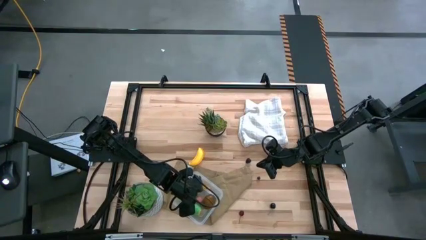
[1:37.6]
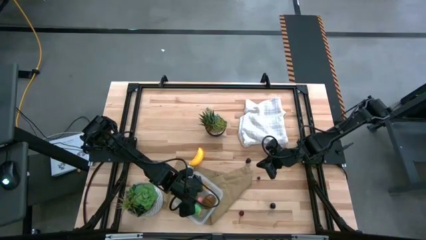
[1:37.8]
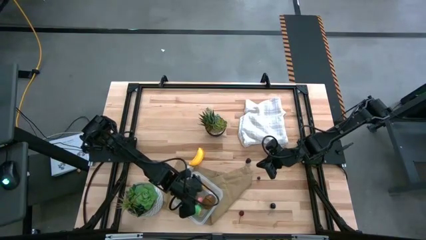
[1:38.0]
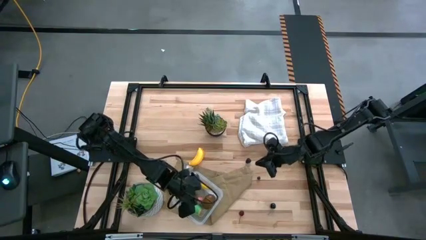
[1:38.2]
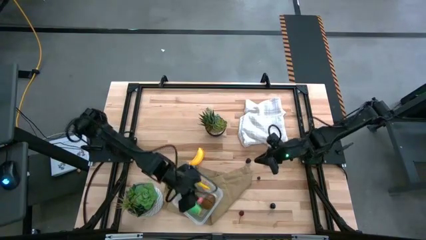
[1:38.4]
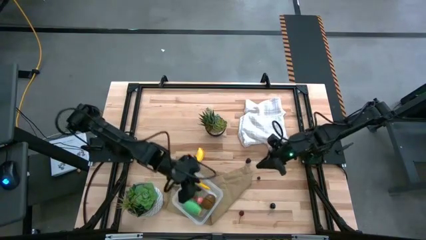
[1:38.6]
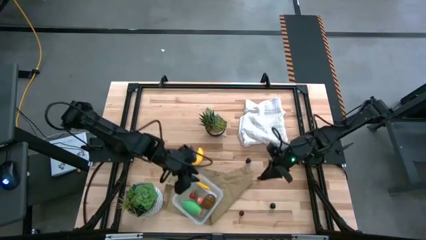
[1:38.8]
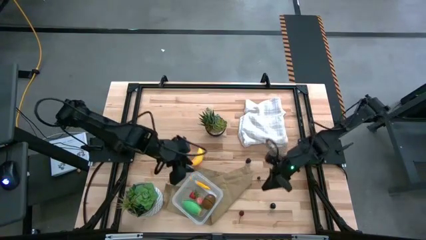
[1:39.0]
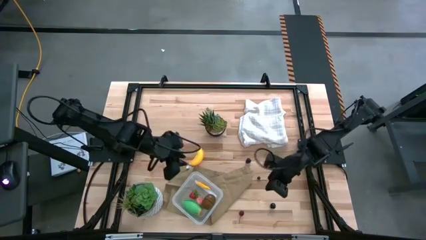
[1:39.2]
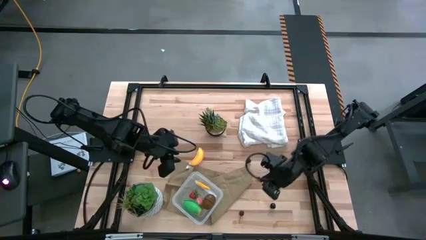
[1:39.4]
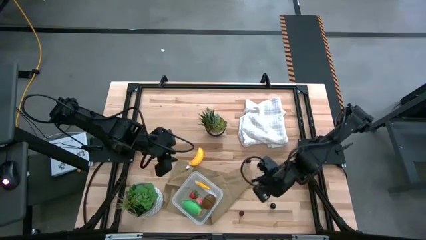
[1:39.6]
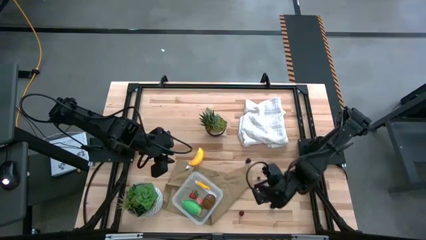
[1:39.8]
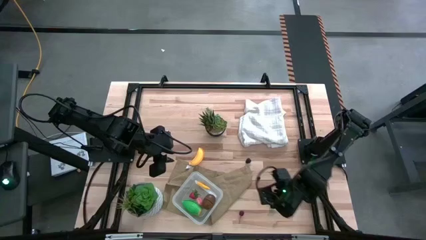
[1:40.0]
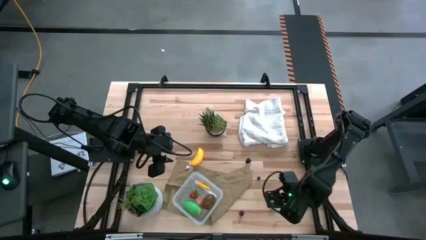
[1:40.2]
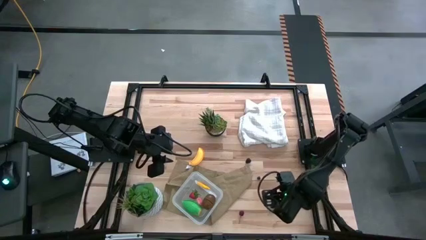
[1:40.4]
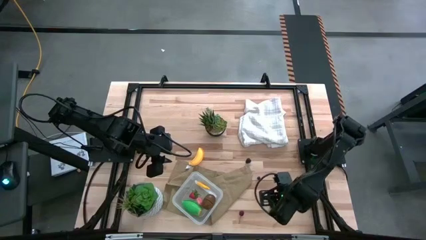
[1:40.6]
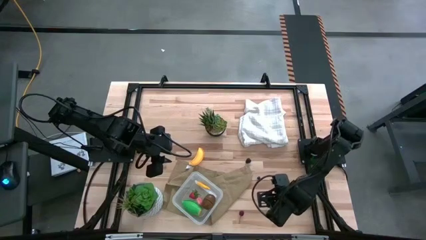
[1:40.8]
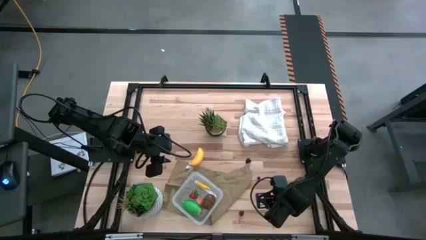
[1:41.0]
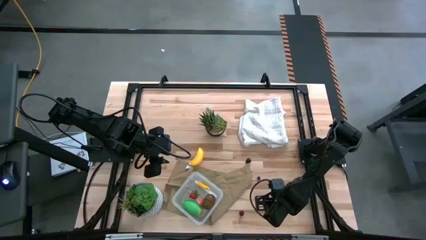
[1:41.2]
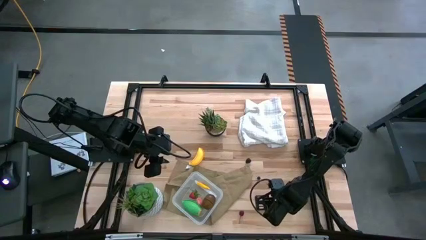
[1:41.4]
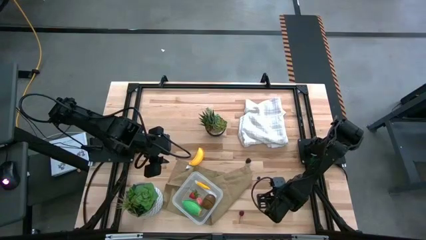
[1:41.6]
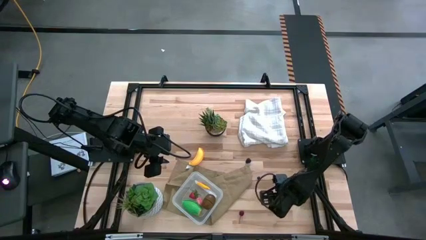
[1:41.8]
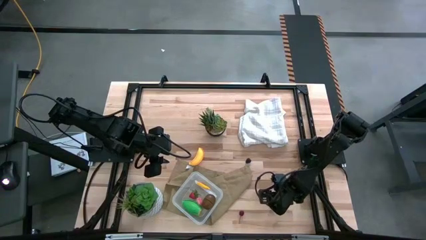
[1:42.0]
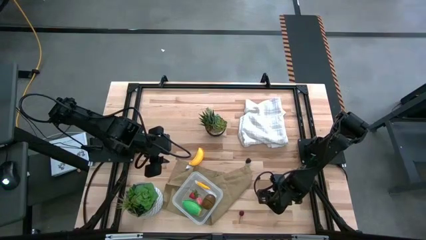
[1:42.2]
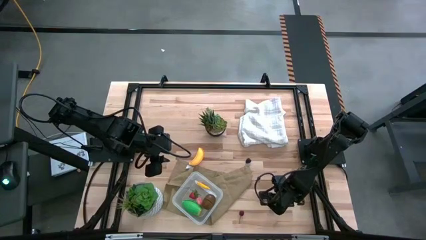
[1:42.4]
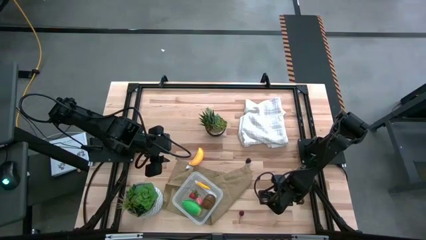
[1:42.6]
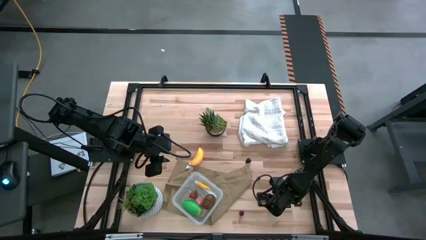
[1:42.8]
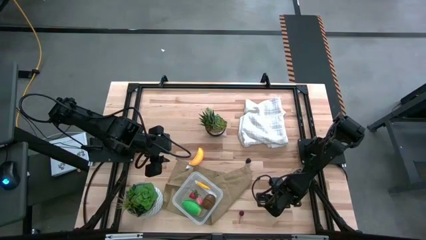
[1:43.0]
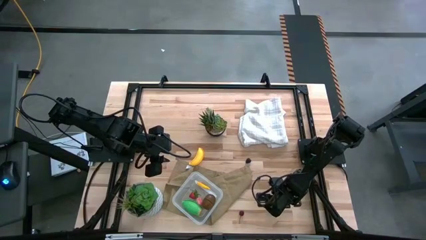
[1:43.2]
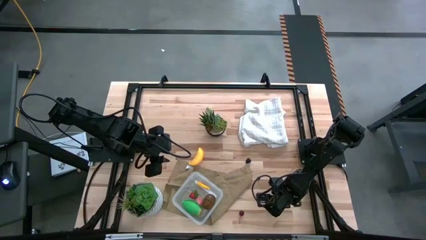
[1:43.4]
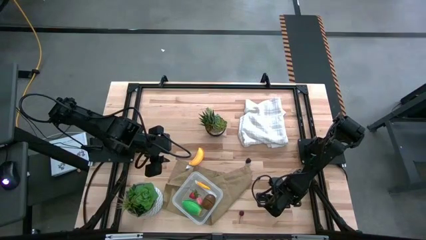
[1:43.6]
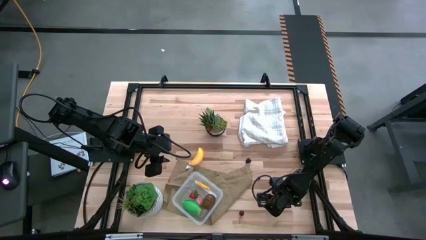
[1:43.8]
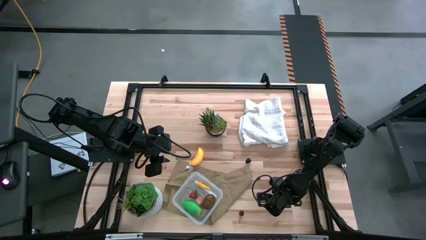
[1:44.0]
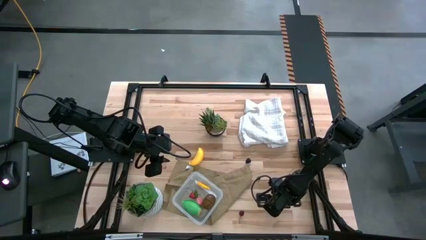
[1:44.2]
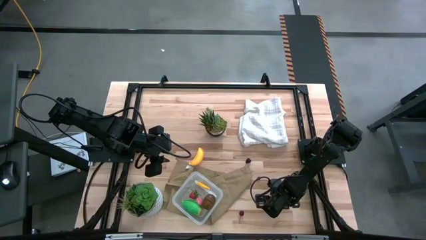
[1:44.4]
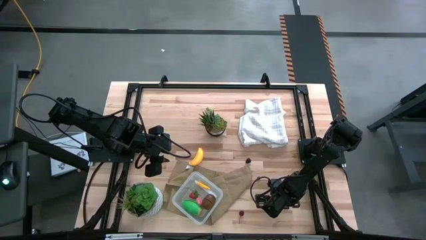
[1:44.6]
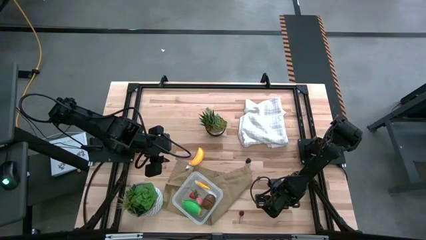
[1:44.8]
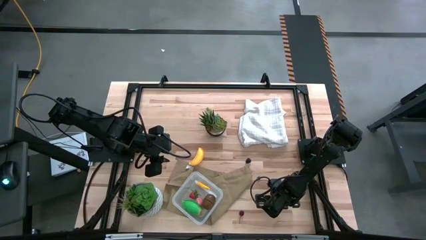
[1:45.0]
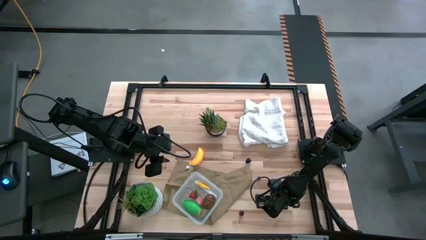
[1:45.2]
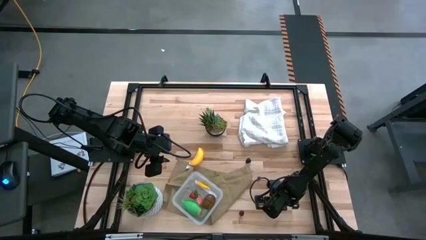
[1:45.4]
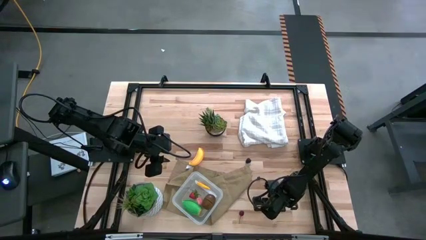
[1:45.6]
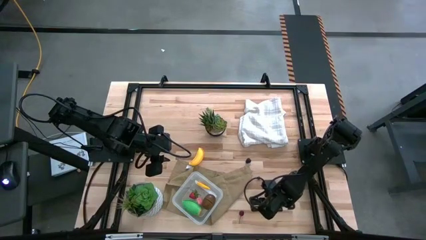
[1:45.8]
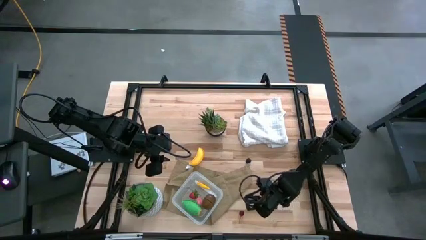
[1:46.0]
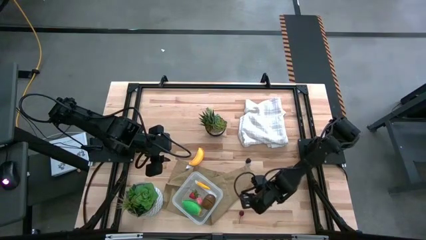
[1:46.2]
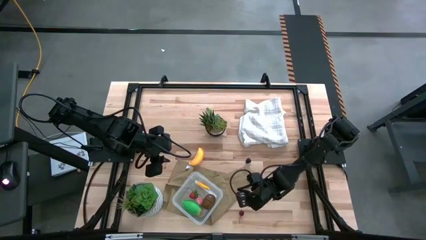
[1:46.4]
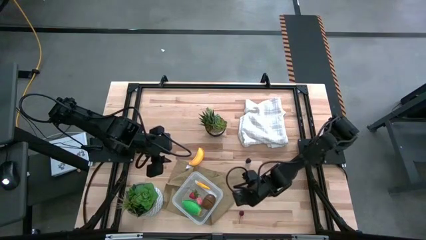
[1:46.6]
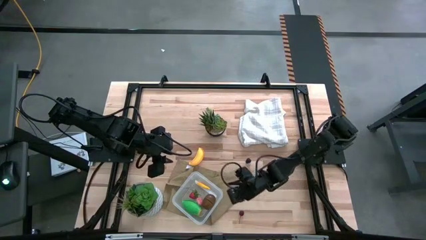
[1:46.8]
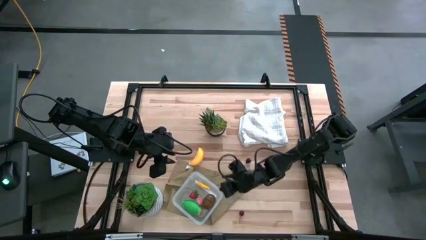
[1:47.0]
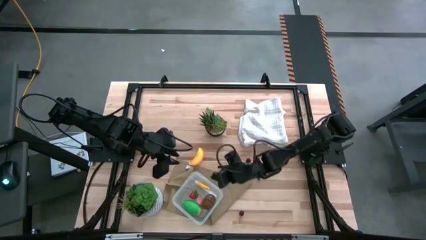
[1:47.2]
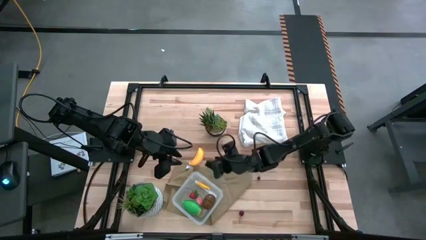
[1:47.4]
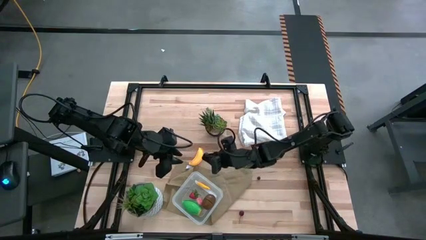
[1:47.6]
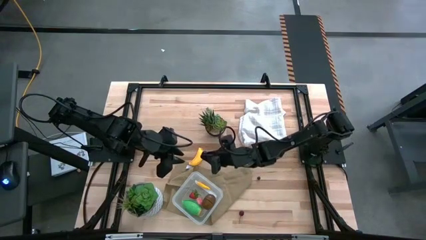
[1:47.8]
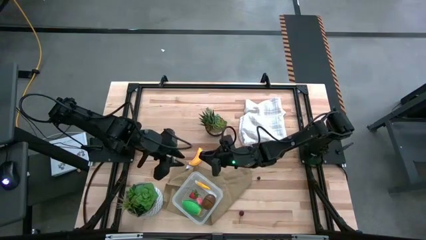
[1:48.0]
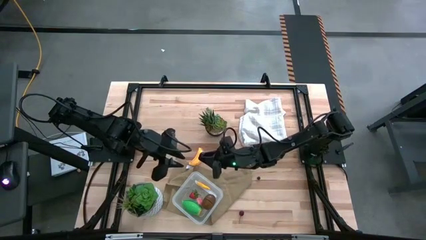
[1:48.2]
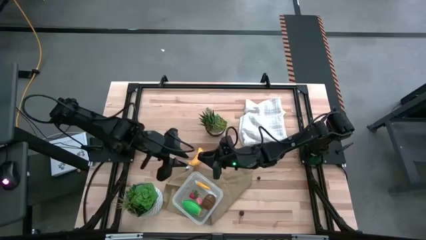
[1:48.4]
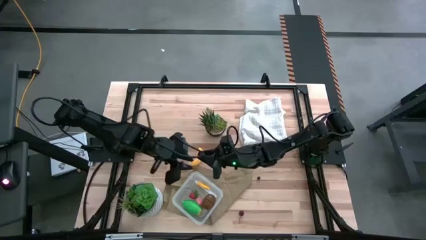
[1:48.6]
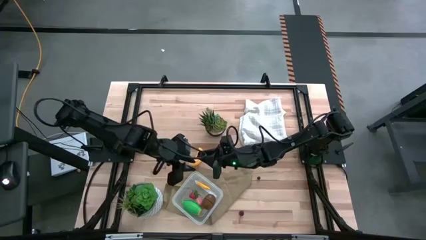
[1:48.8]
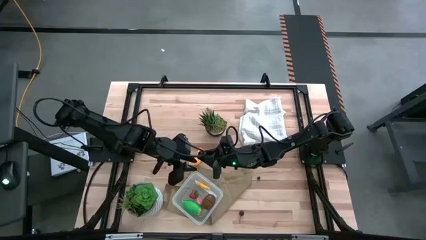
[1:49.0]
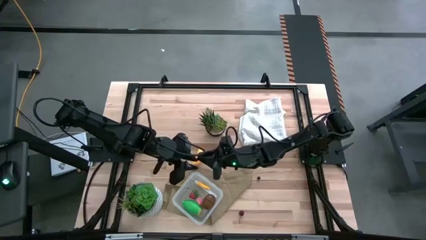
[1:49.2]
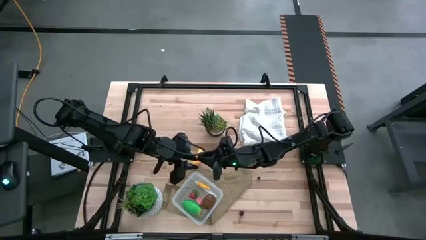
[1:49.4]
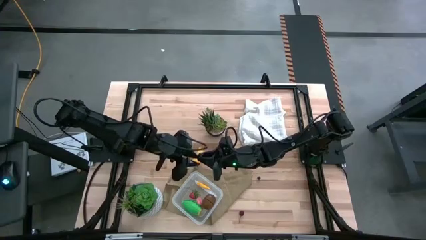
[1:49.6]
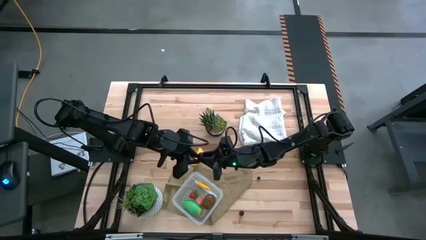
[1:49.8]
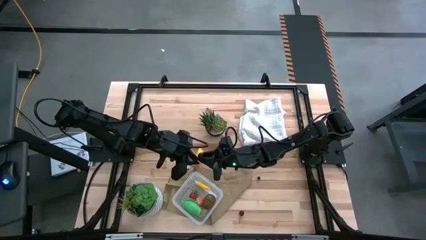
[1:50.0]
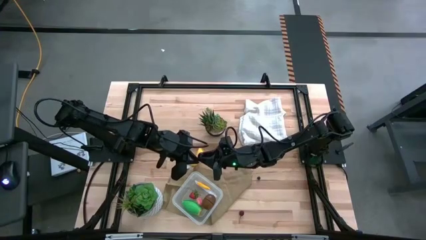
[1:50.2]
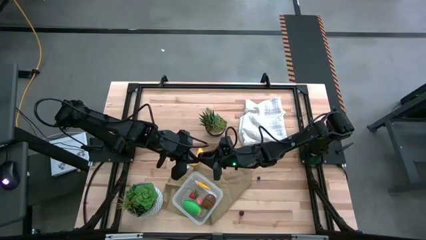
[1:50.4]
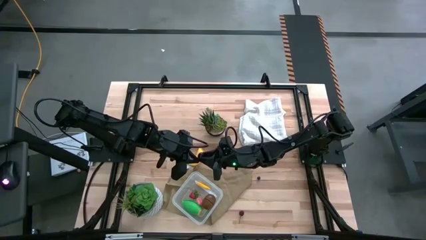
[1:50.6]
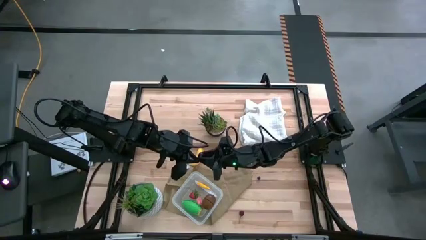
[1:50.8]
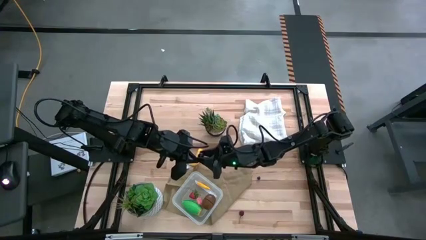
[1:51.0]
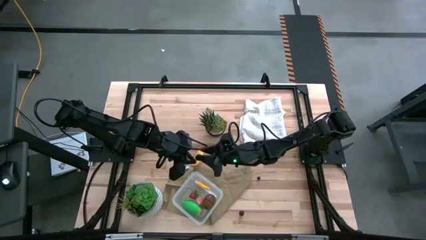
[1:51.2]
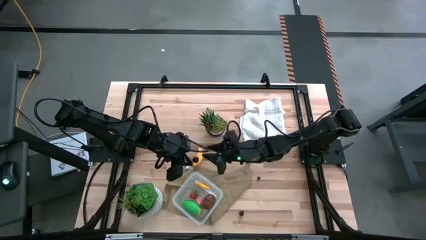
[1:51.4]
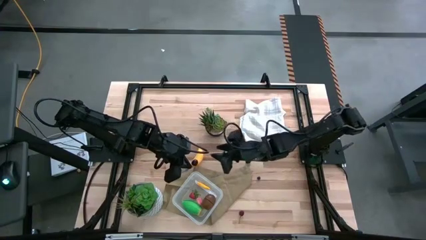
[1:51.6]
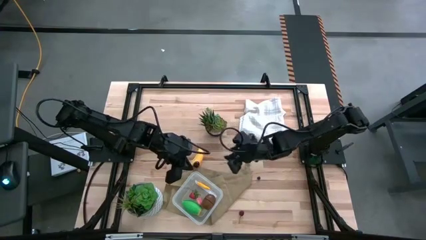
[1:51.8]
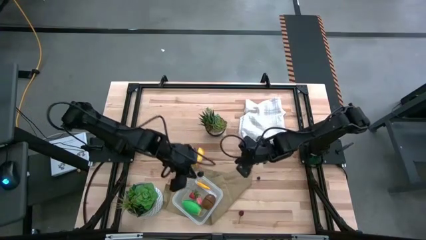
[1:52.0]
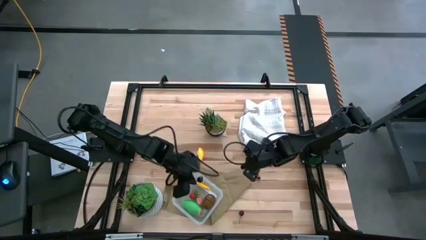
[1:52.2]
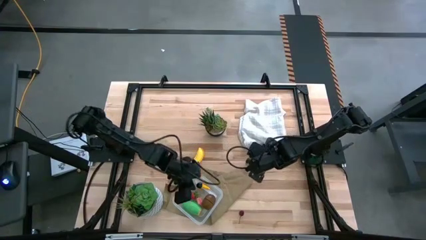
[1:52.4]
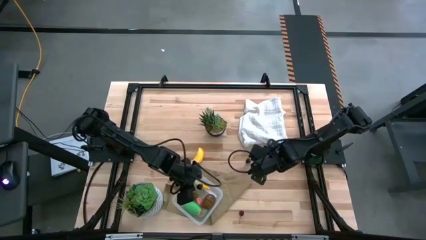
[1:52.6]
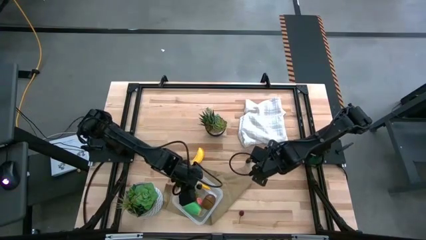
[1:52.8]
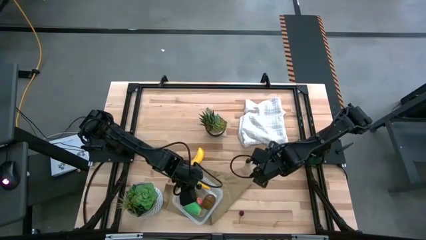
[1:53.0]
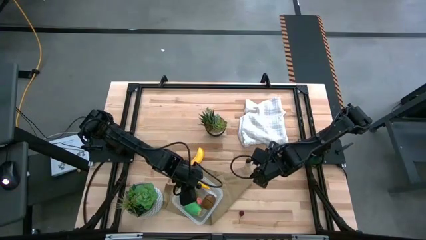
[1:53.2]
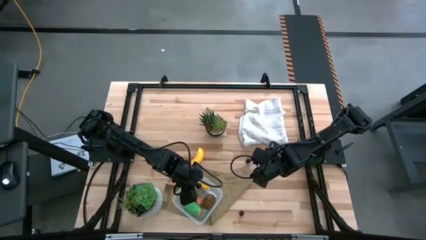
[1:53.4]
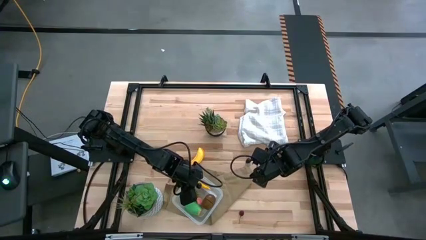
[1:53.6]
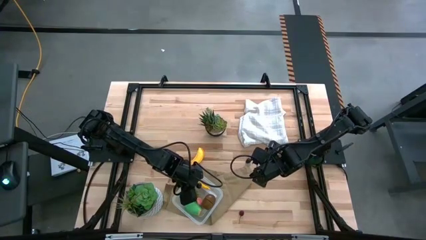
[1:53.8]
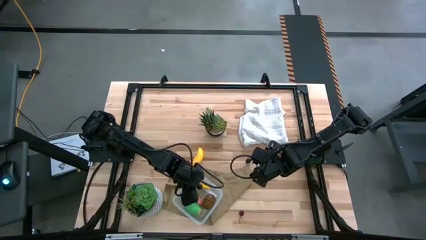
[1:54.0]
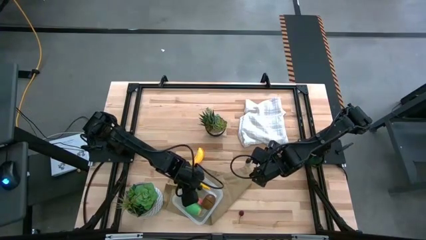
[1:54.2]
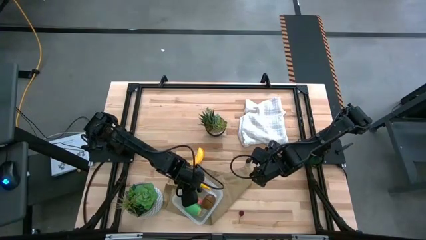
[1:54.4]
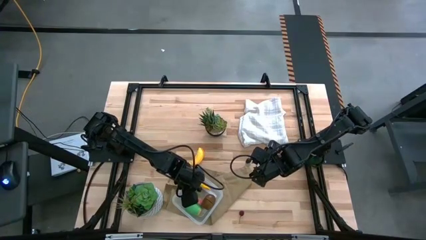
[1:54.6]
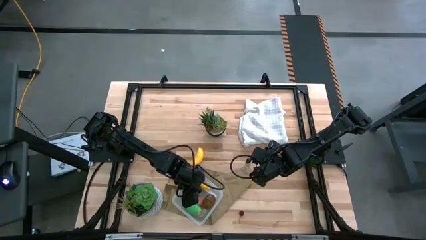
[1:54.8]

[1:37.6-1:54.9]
Task: Pick and placing Produce into tupperware
Put the black cherry into the container
